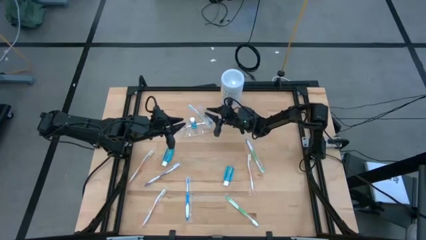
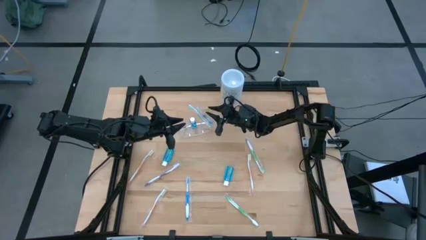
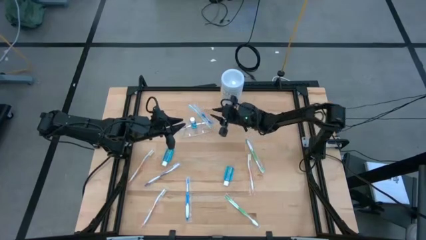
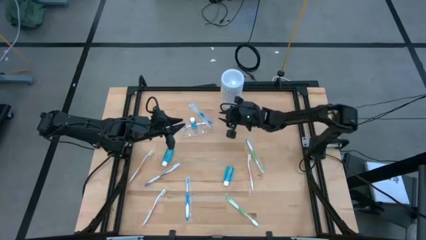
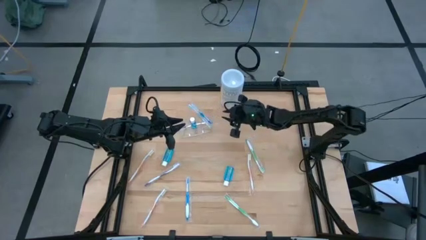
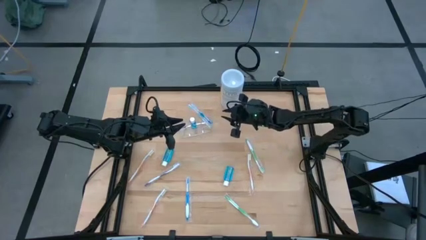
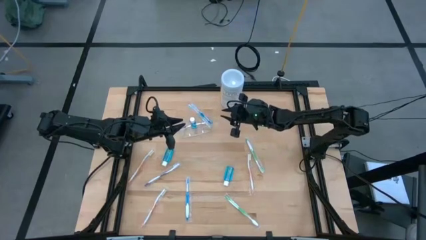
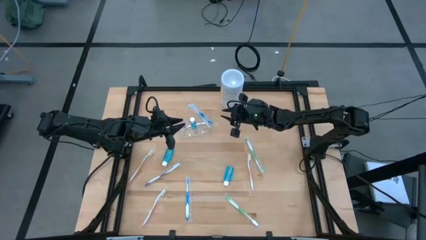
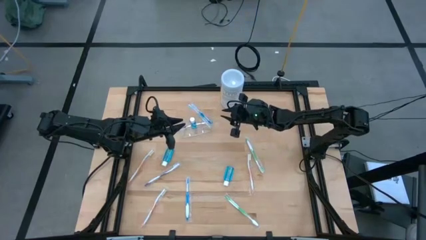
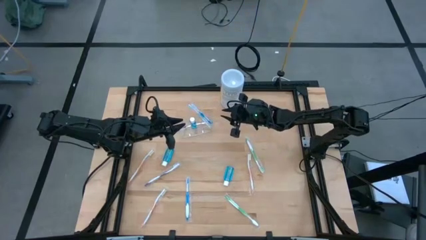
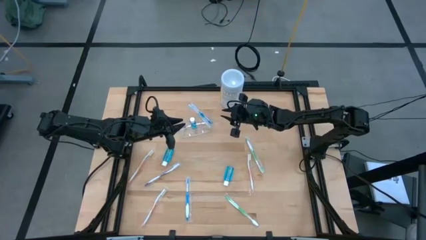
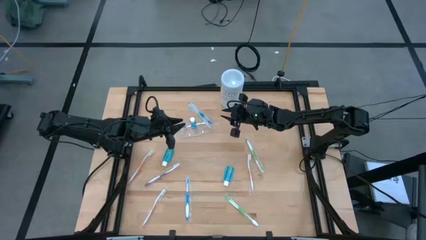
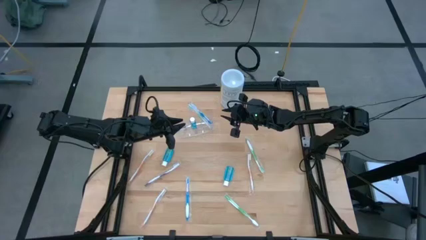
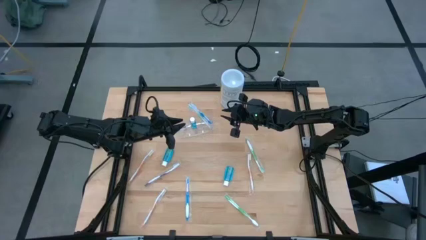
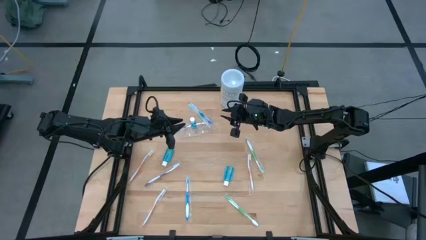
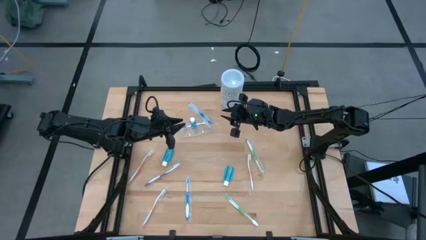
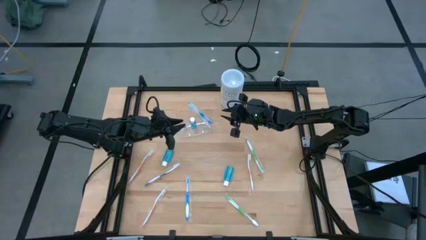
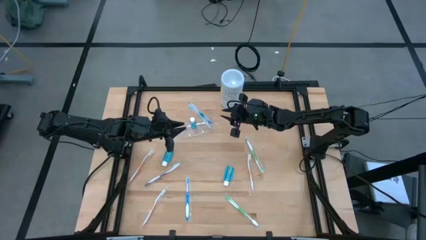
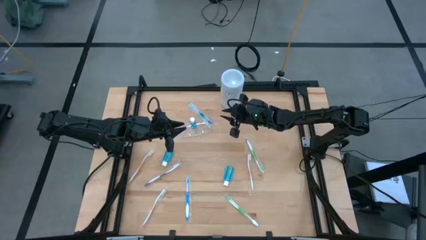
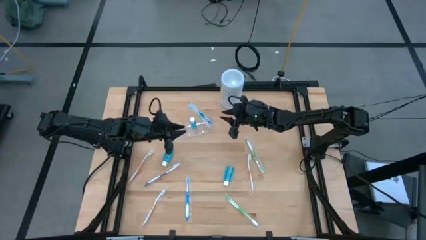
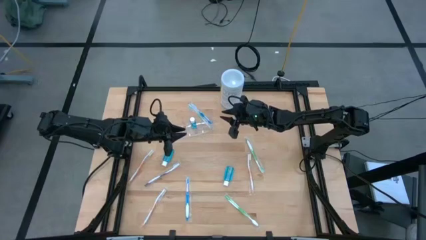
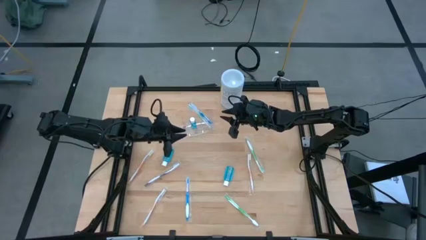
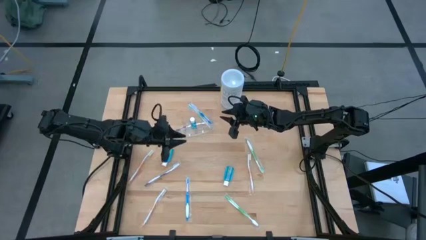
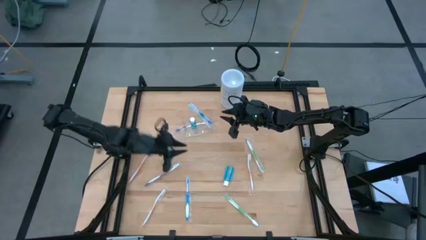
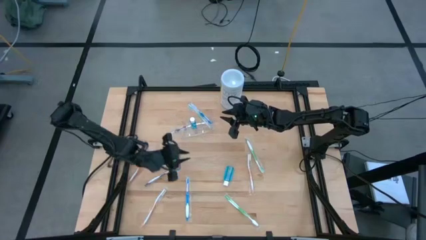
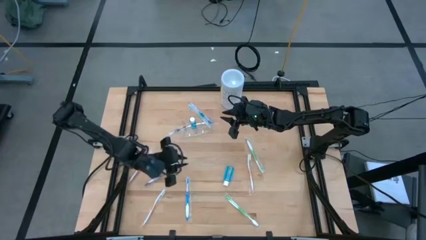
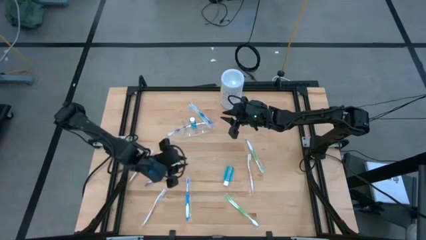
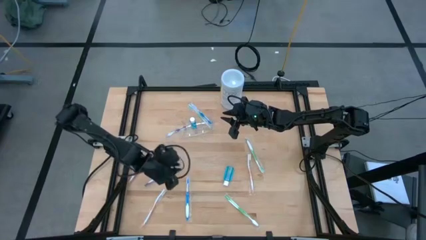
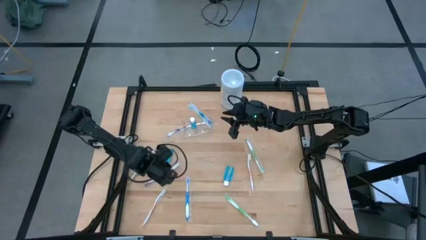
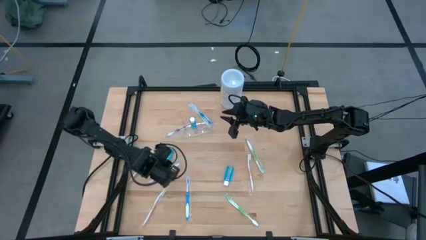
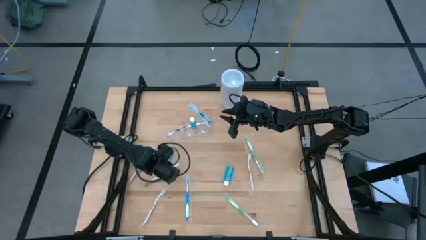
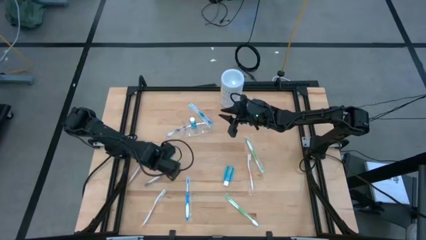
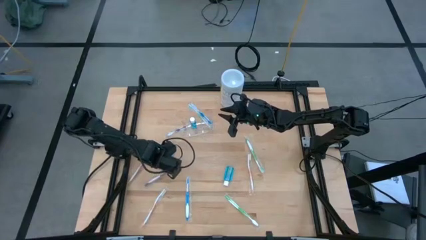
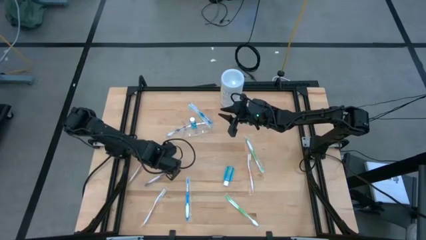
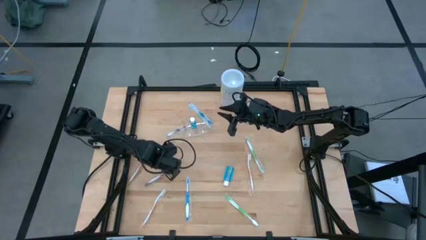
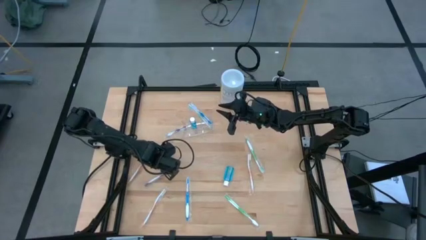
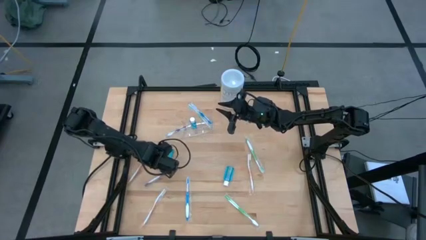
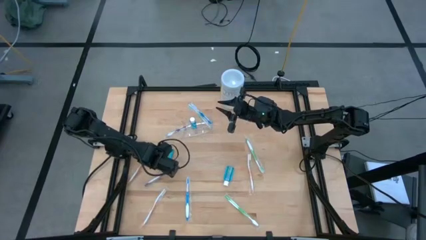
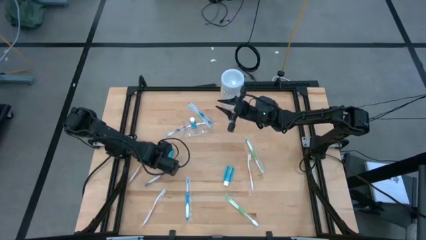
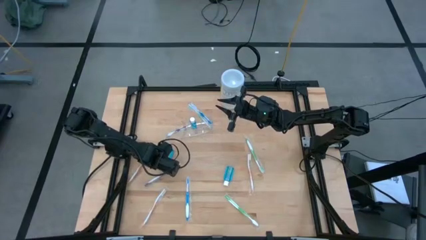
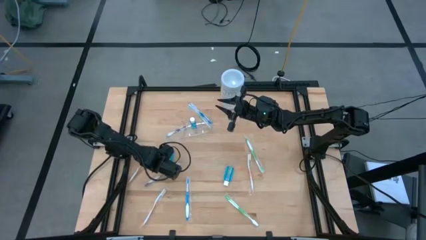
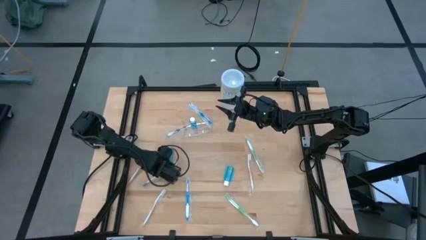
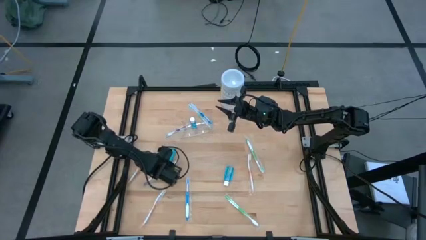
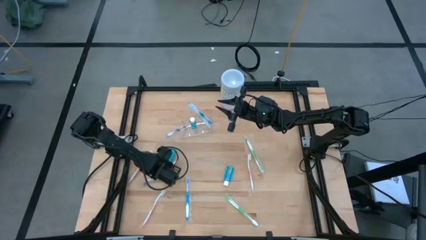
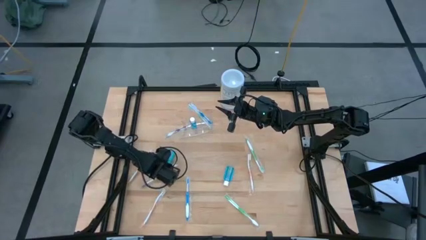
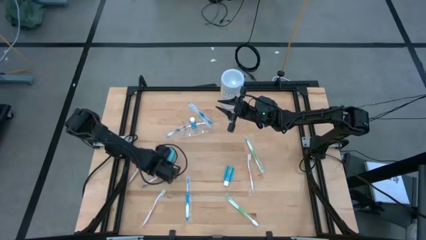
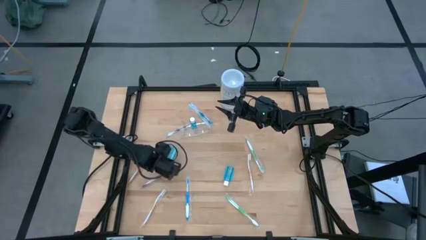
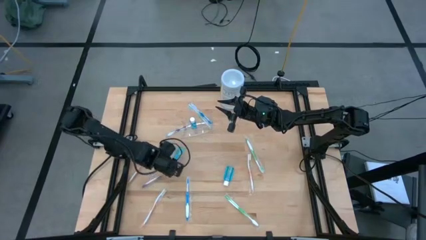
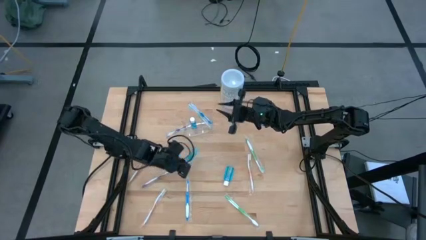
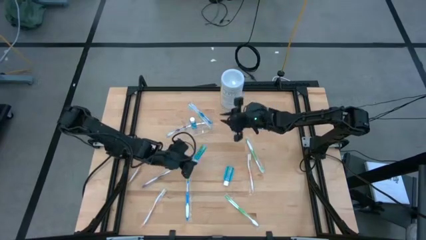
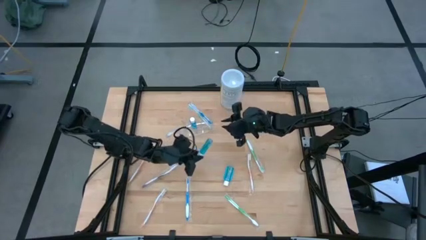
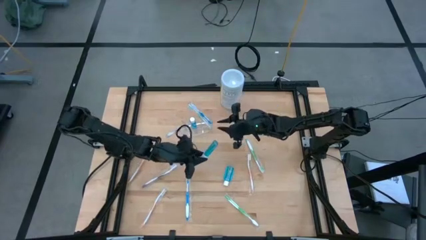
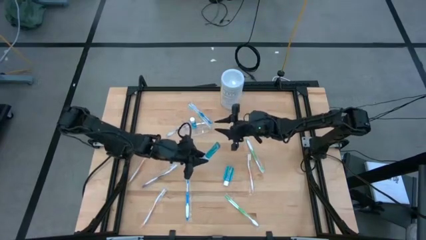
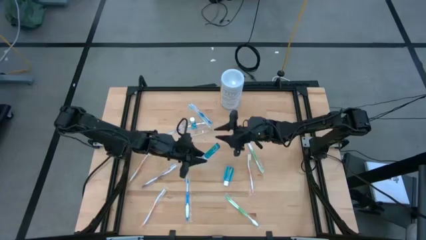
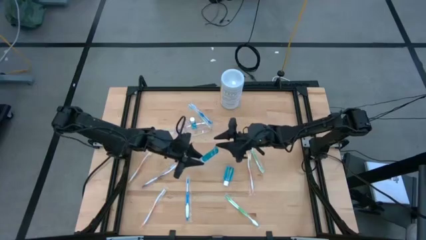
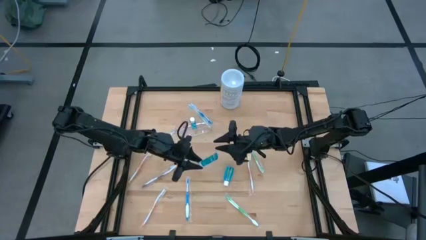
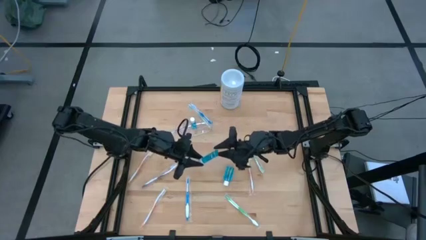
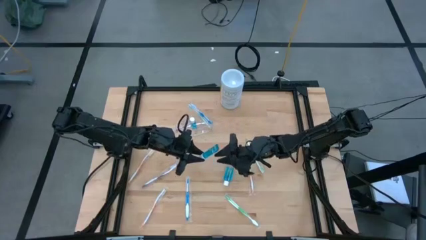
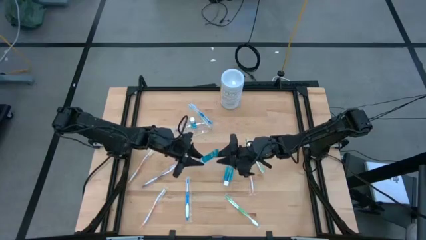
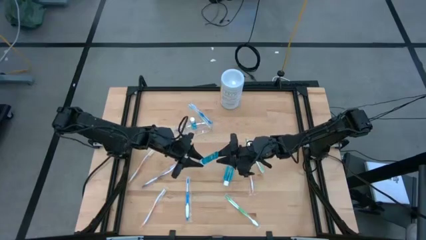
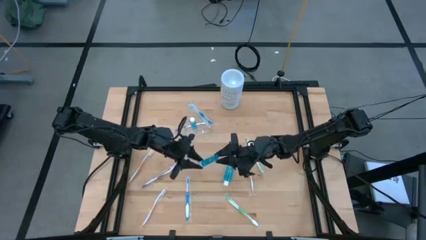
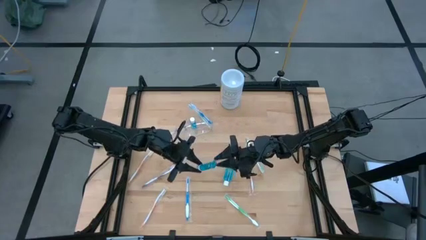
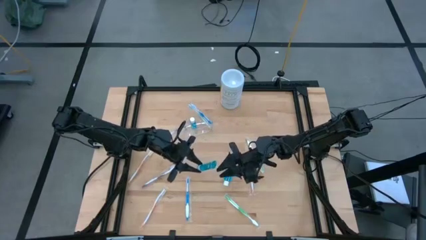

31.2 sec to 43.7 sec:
Task: Pick & Place toothbrushing station
Put the left blue mouthwash into the transparent organizer

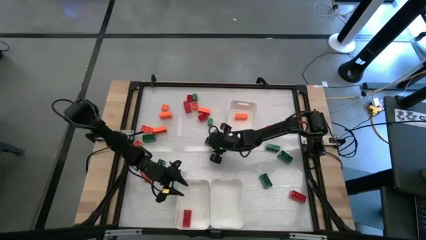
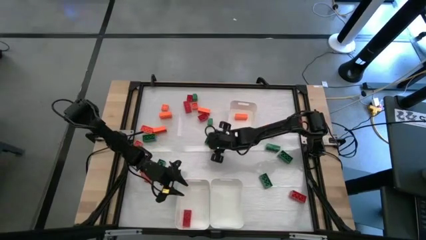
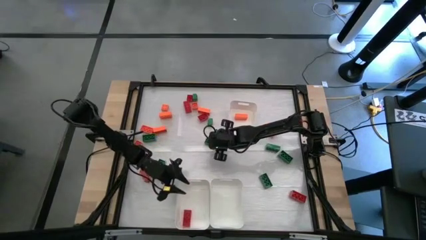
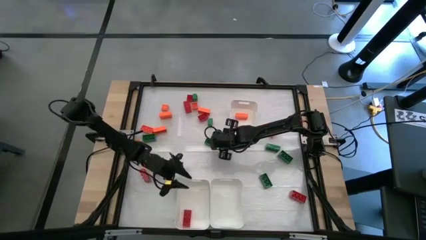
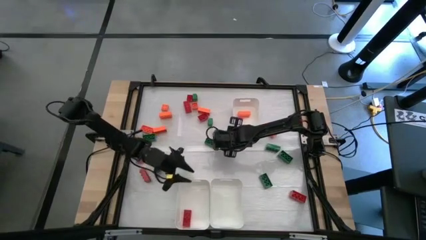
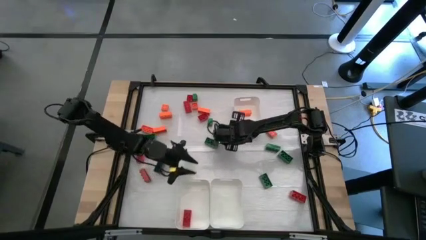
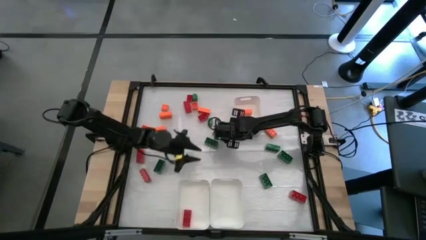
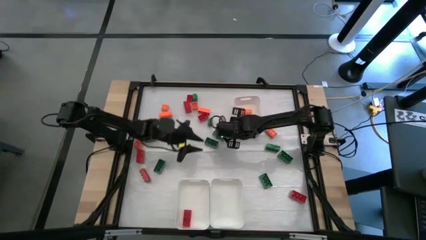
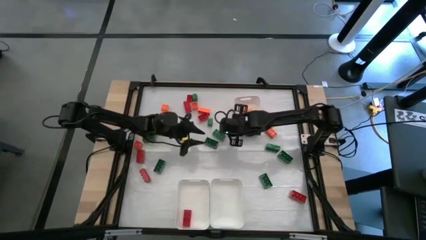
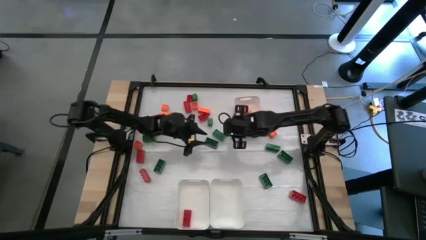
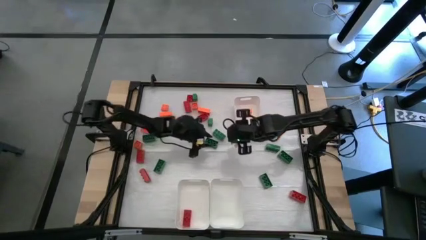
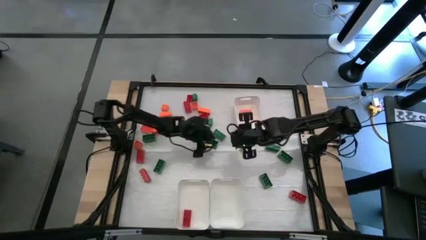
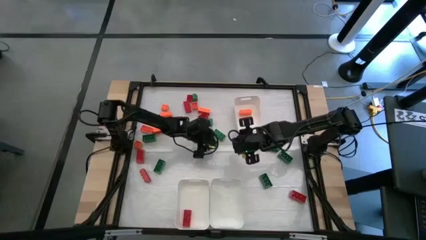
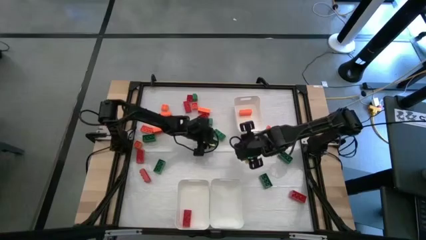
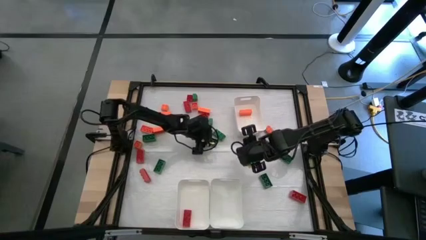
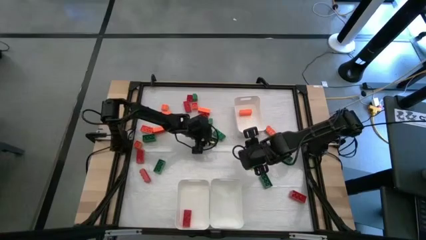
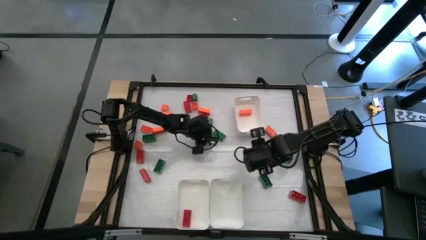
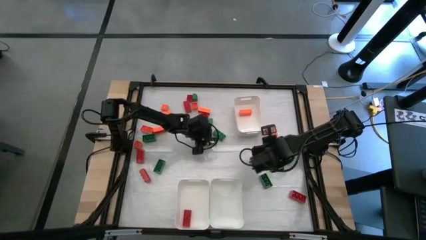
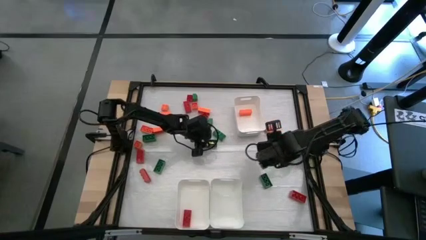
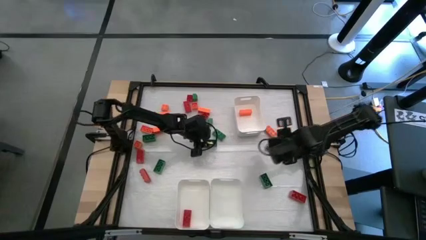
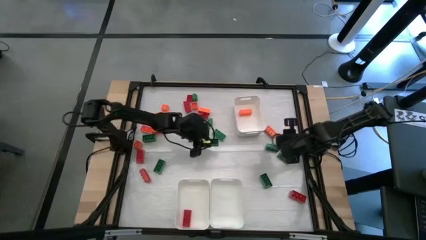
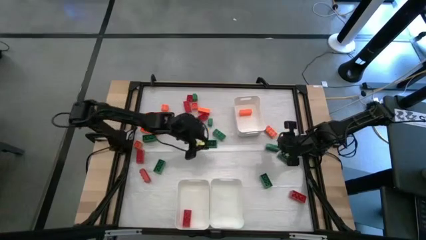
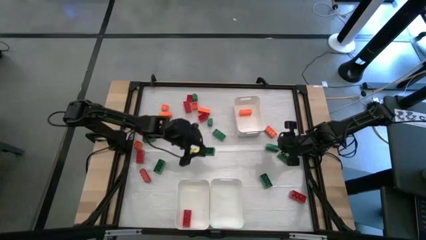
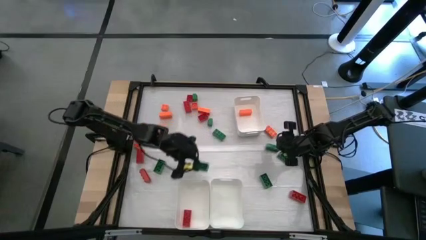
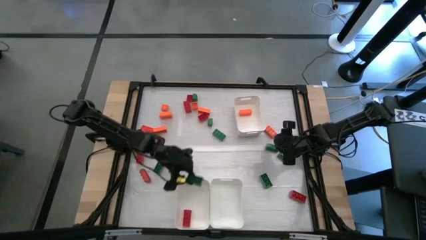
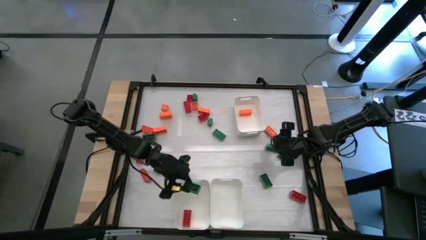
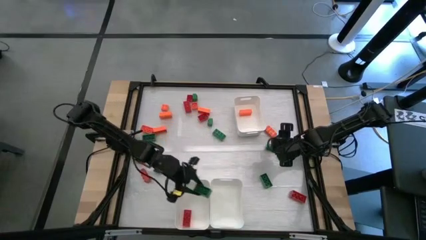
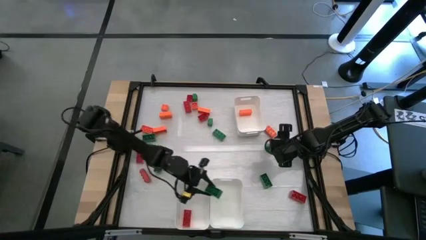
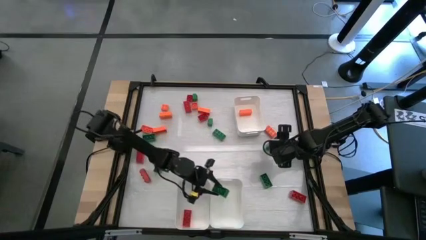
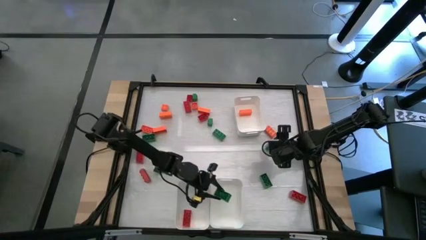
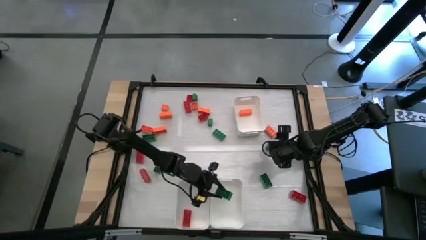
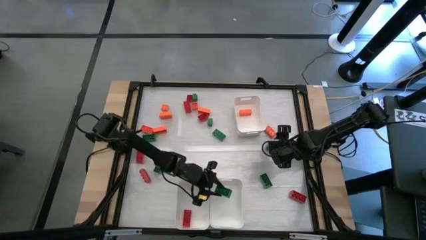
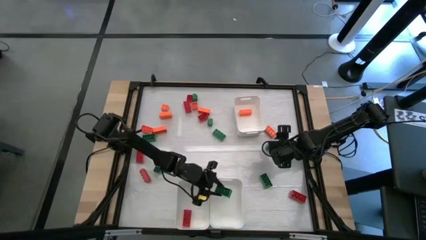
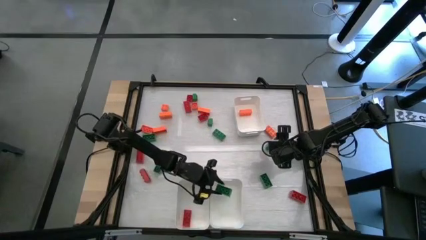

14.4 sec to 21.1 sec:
Task: Sort blocks
Put the green game piece into the bottom right white bin
